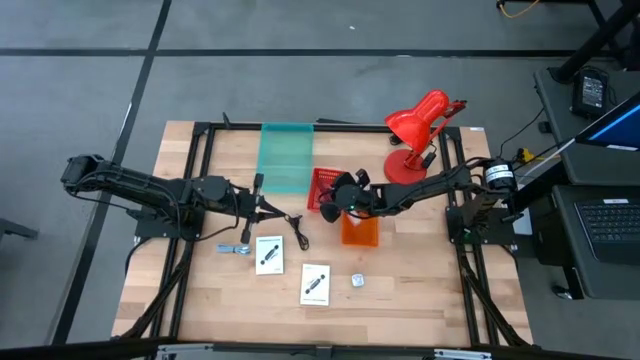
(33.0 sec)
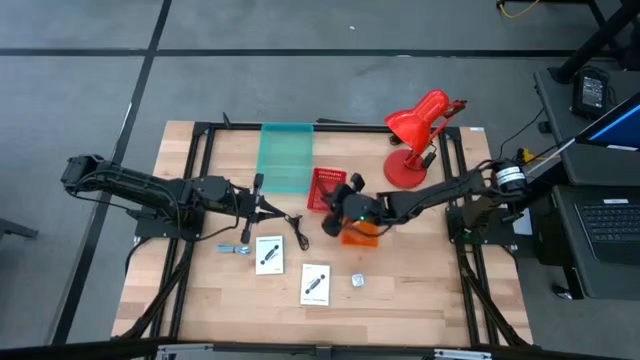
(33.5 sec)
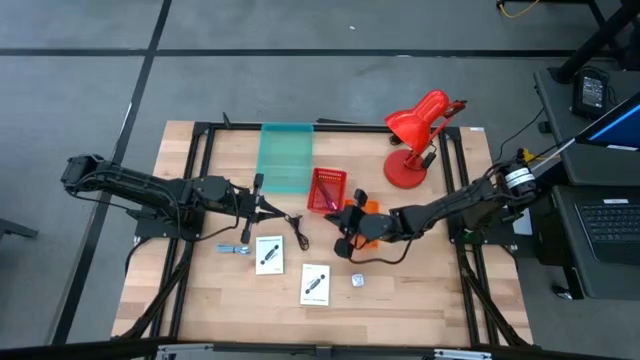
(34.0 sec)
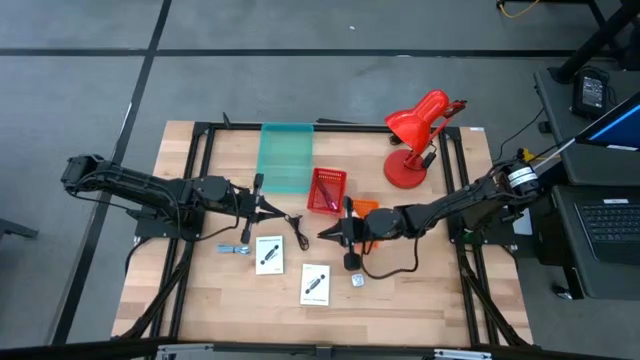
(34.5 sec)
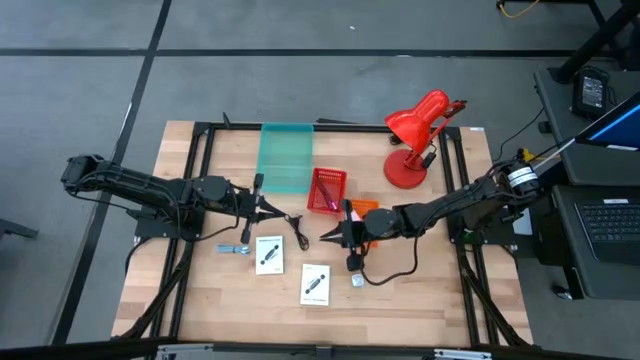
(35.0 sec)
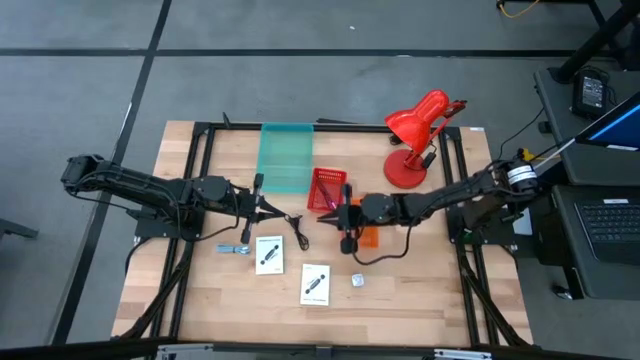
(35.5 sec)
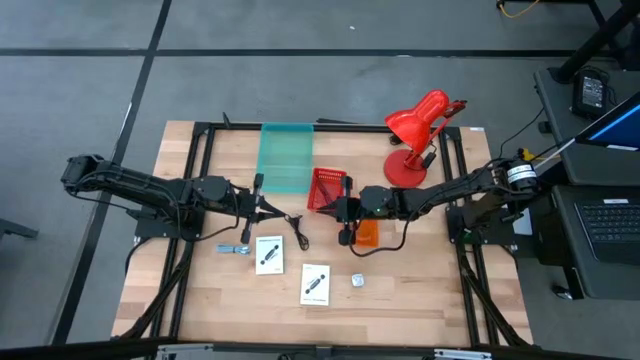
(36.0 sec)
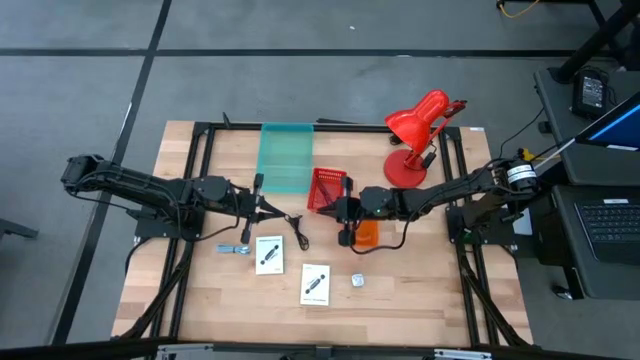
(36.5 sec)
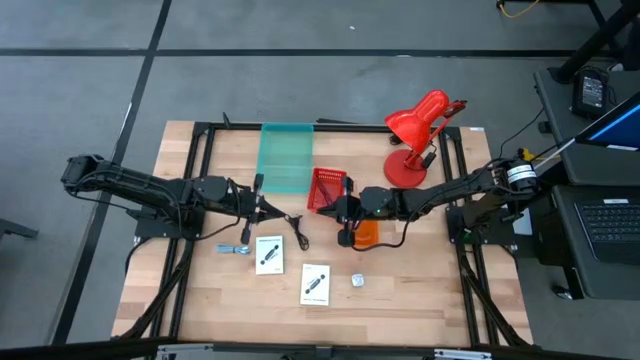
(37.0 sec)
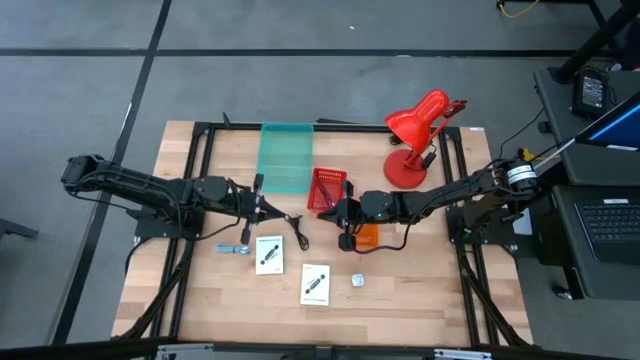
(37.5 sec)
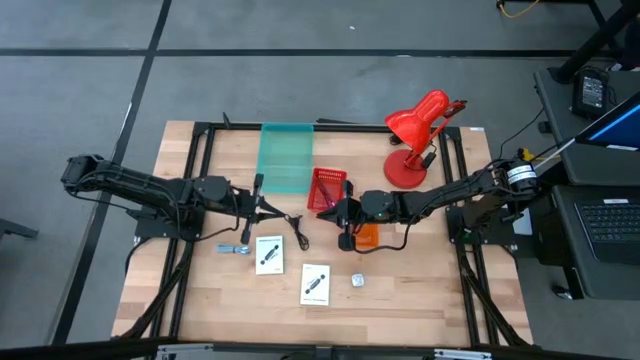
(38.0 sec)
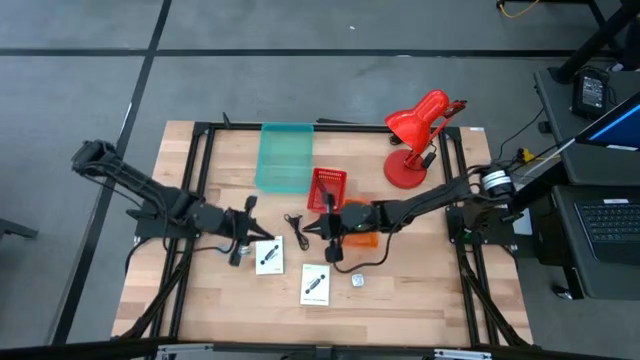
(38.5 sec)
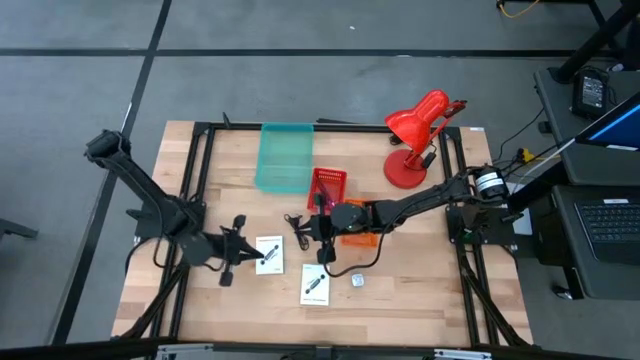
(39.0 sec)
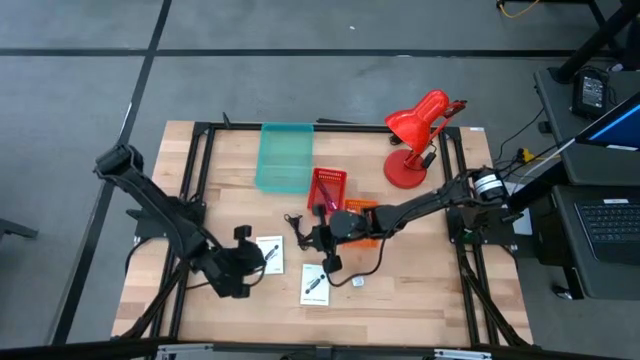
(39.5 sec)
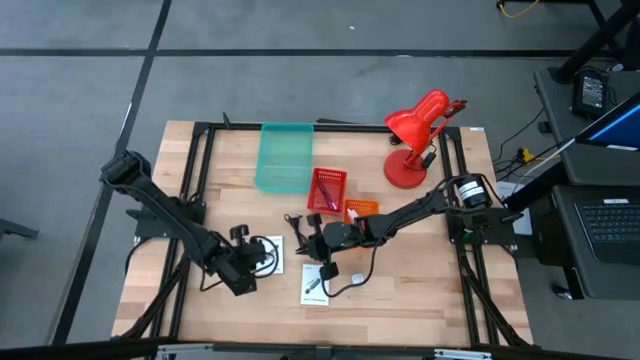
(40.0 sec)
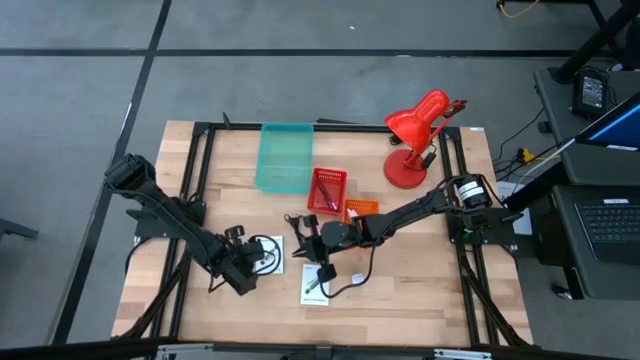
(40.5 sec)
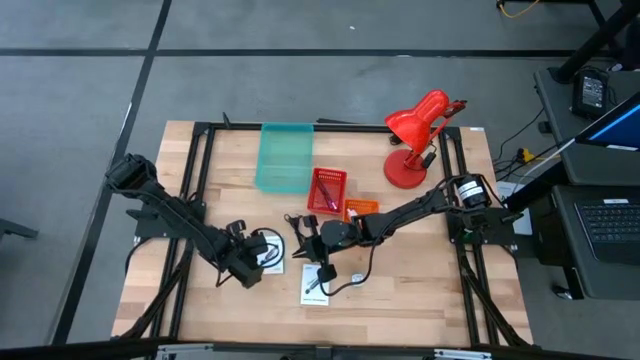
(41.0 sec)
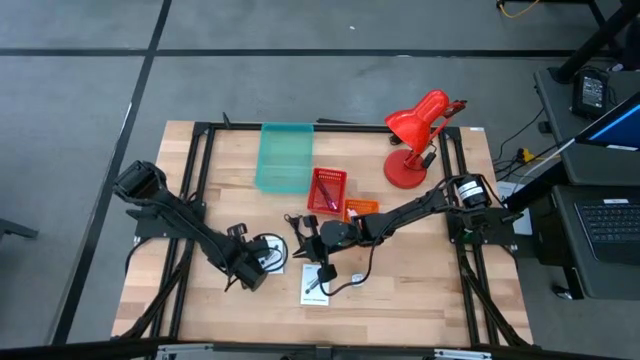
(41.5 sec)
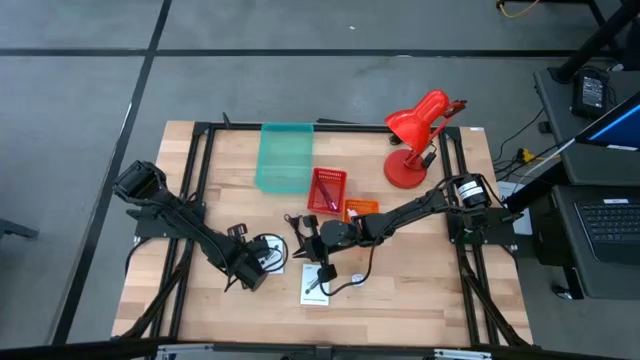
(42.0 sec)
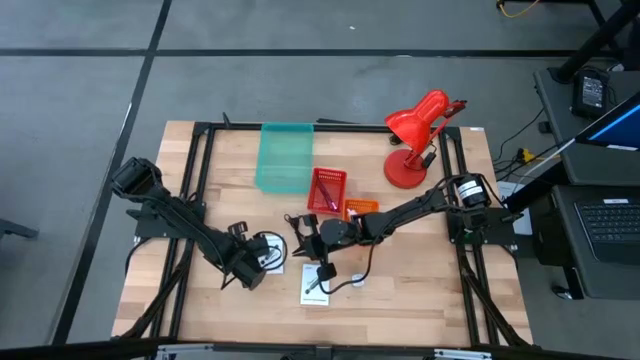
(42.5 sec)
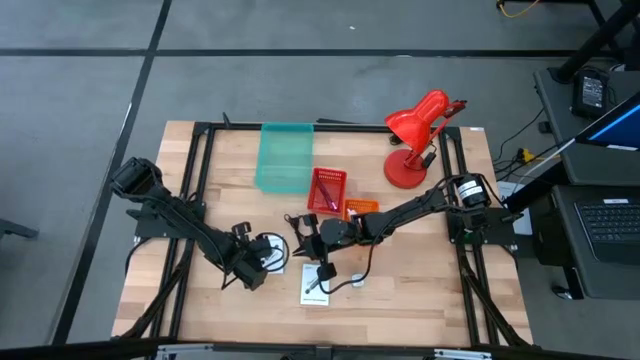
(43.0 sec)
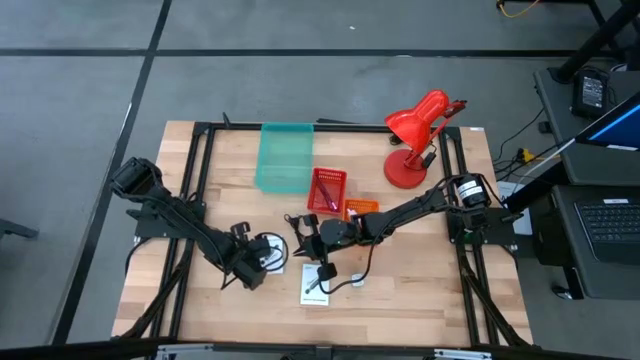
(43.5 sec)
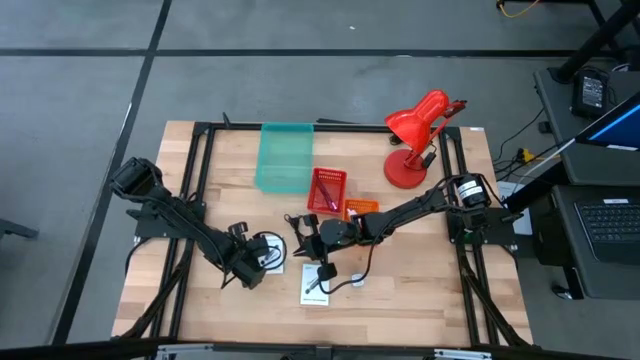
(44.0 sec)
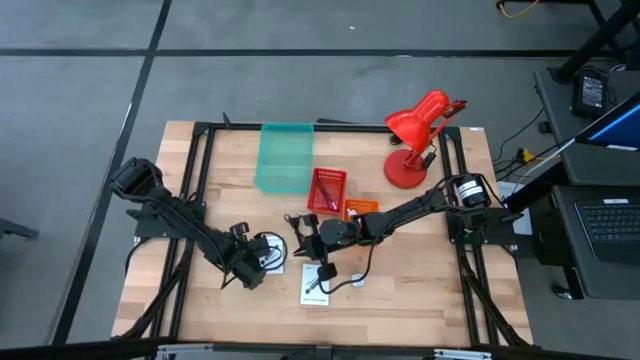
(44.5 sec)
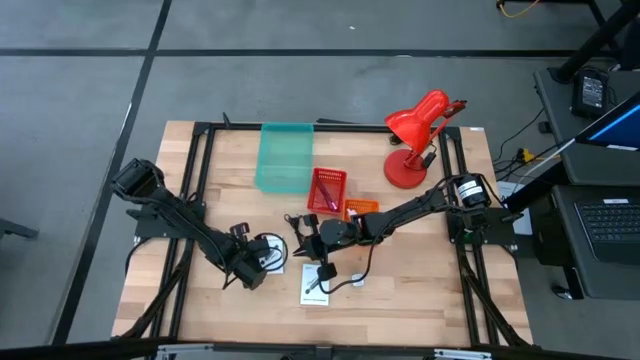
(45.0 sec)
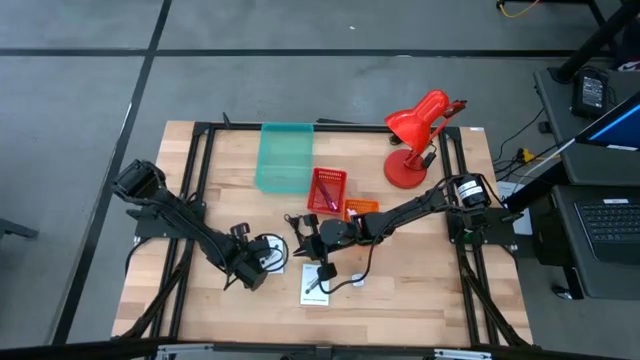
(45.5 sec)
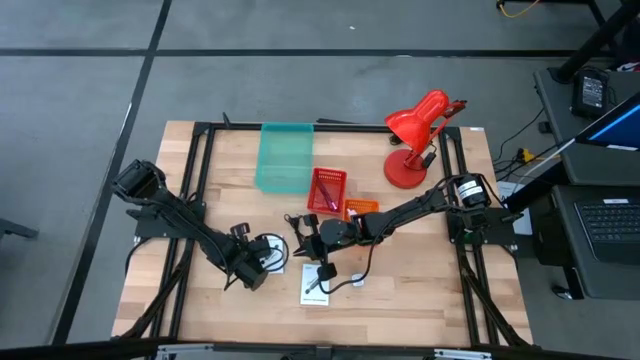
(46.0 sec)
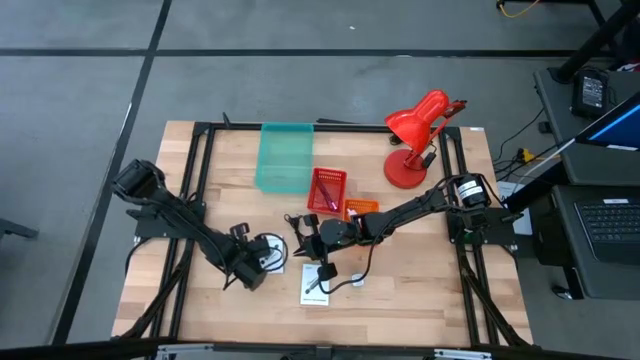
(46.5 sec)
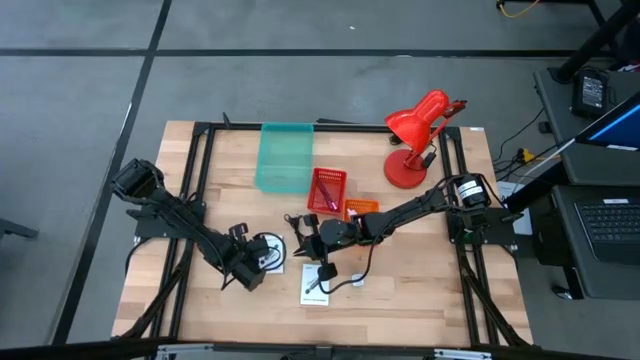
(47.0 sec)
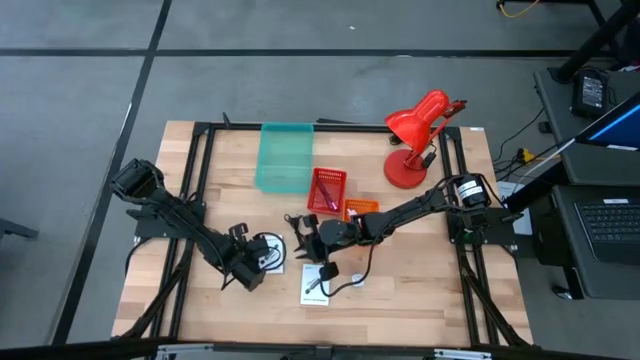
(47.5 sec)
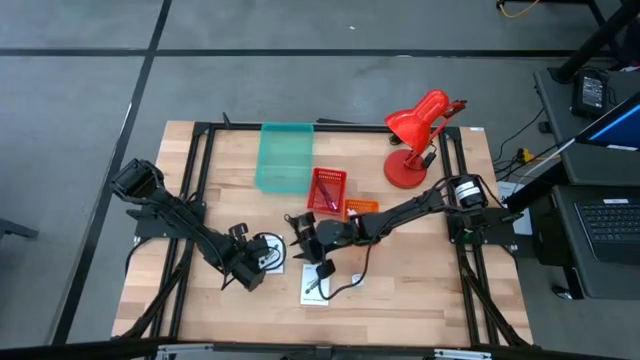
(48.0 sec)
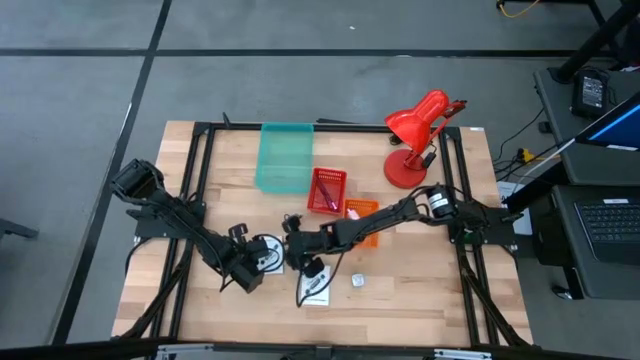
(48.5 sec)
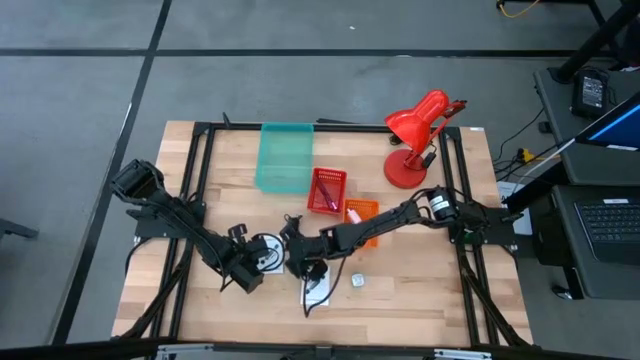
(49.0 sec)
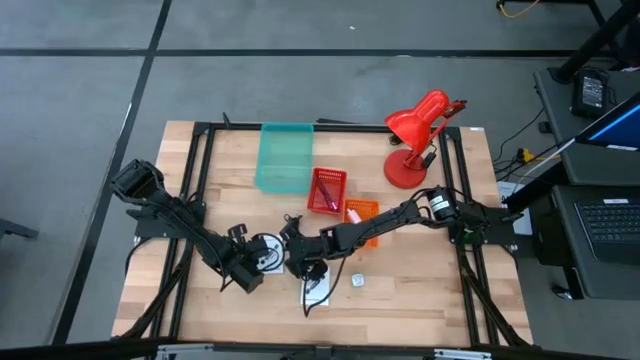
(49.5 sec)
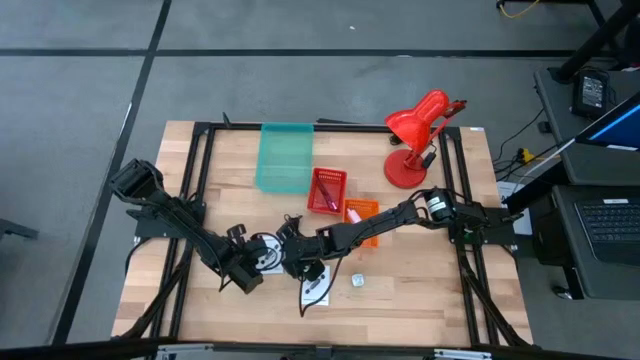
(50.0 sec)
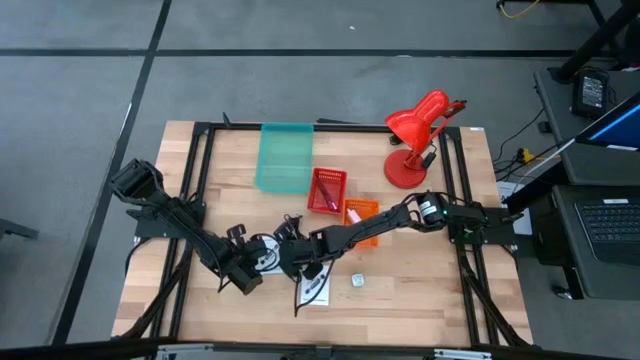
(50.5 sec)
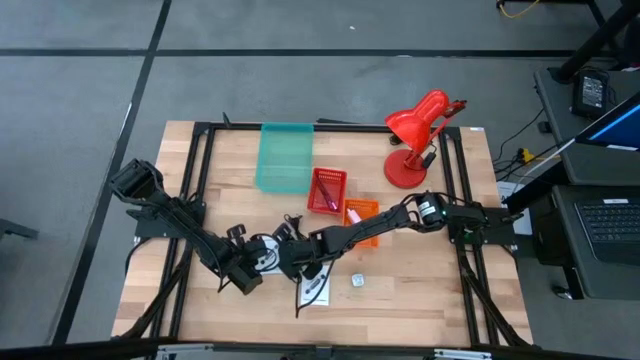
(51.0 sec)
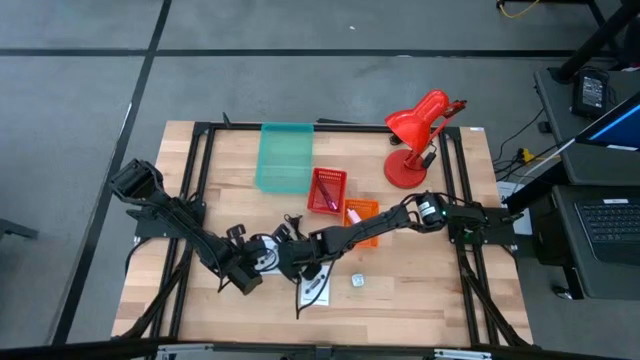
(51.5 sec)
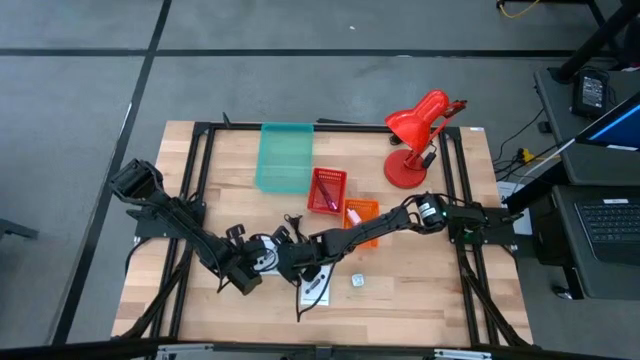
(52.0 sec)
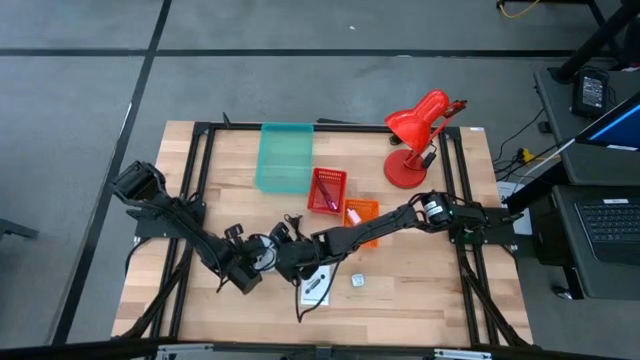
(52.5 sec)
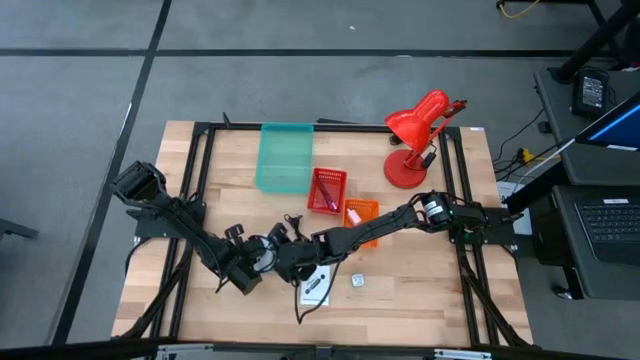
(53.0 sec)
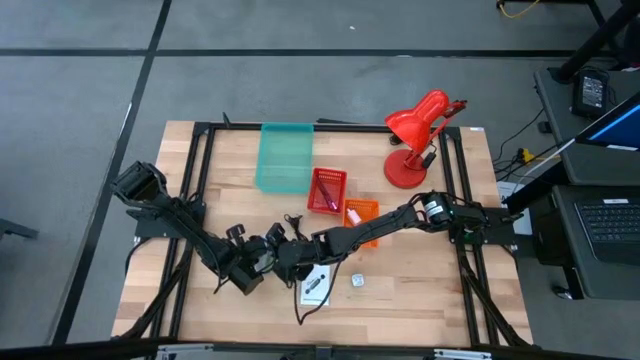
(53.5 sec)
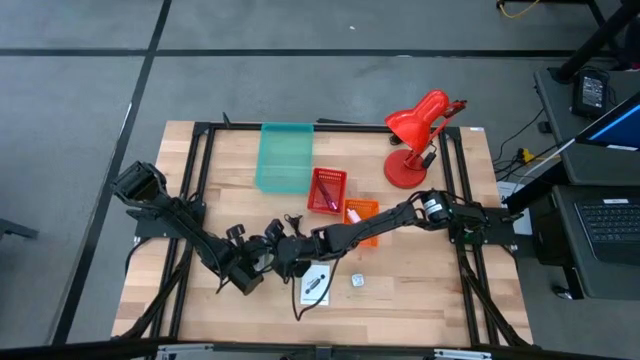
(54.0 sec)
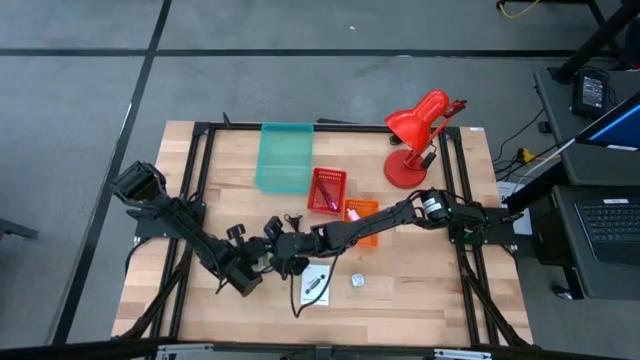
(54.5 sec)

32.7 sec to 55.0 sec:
Task: Pick and place items into bin
Put the left white card reader box into the blue bin
